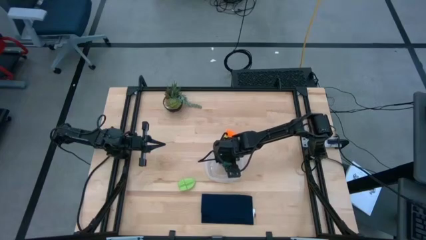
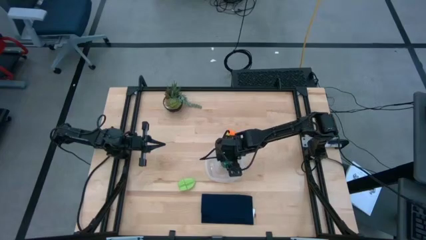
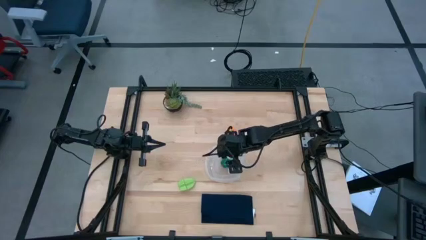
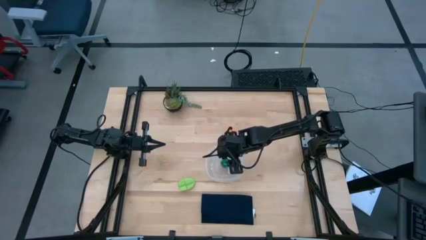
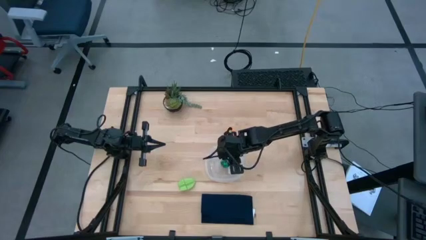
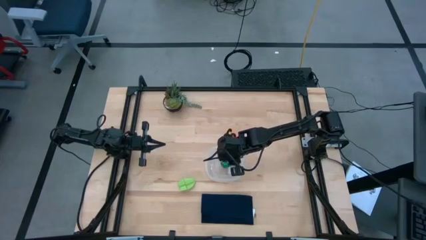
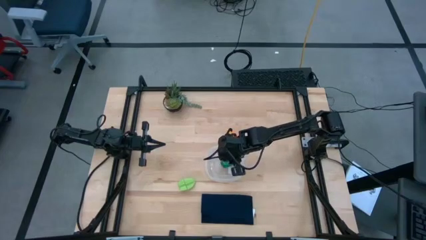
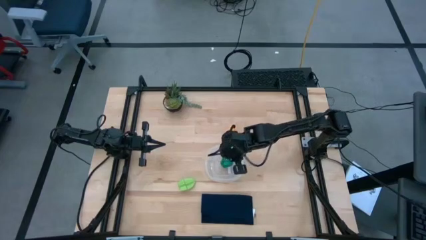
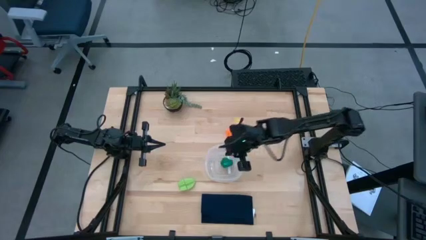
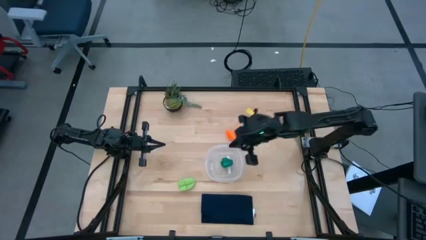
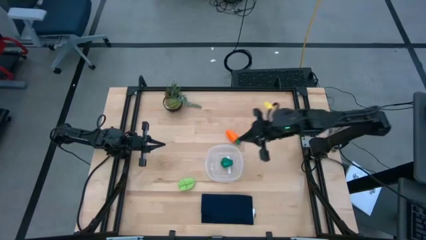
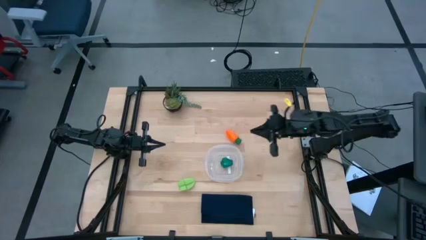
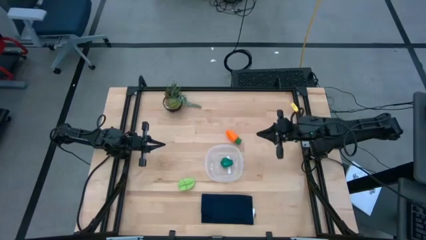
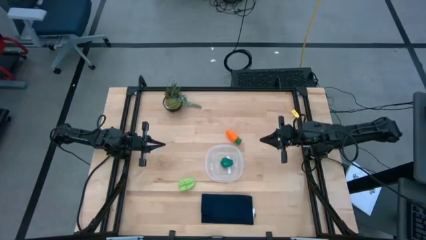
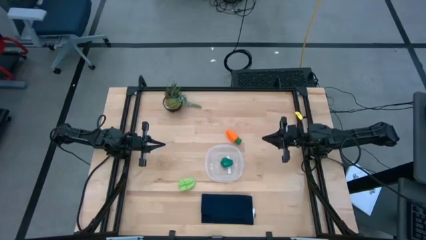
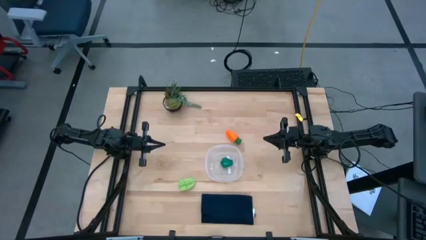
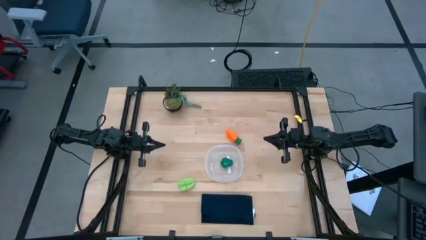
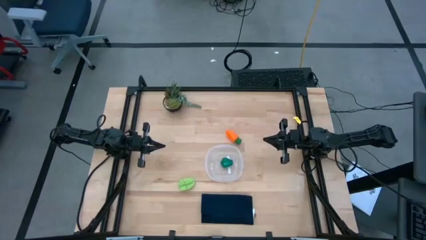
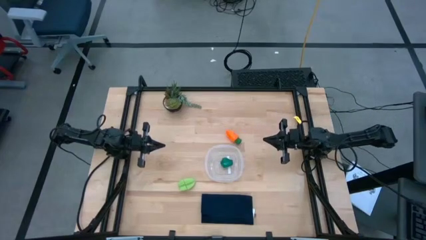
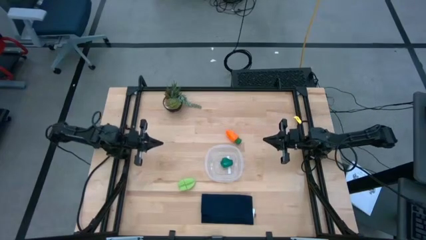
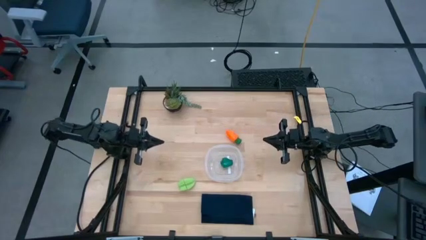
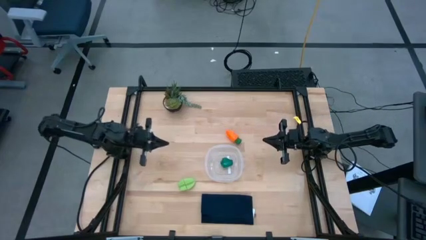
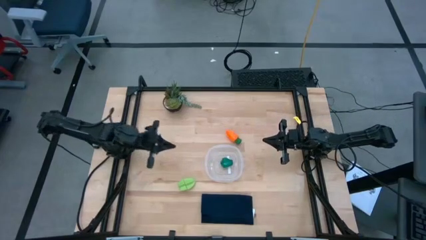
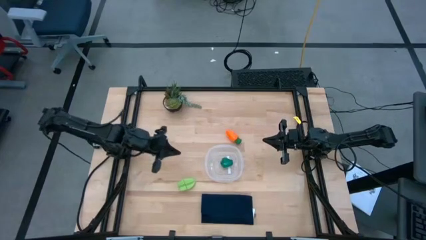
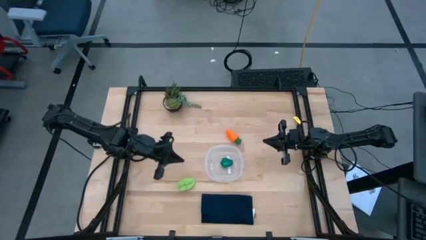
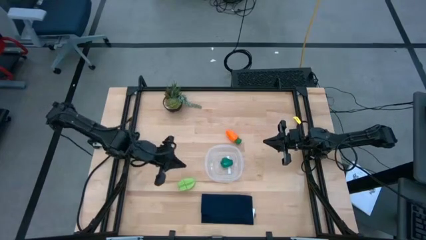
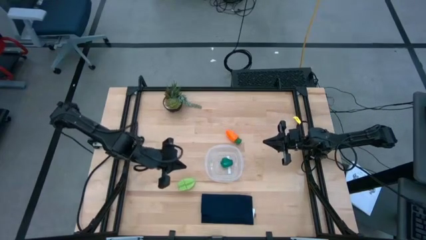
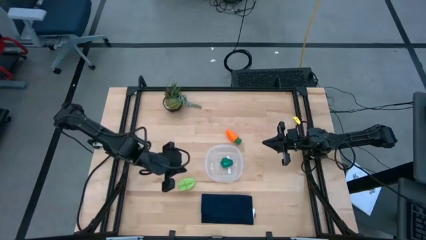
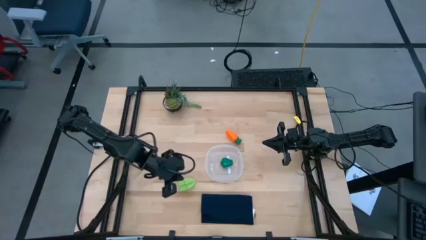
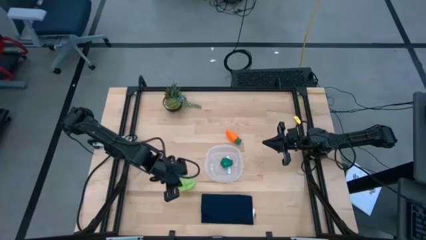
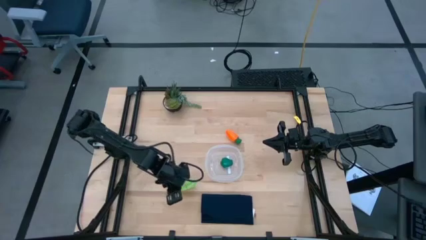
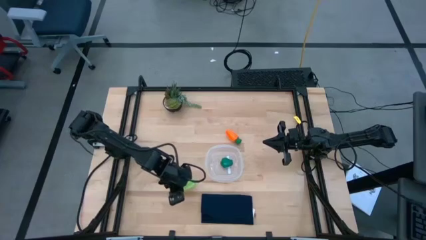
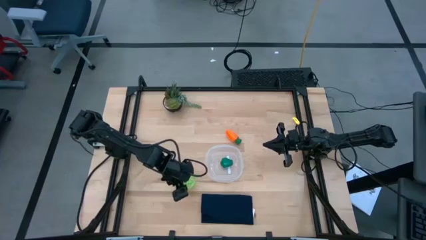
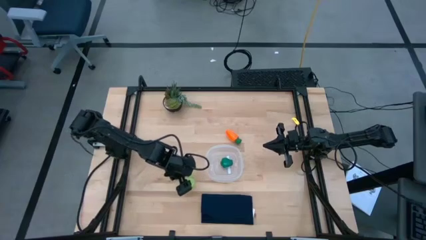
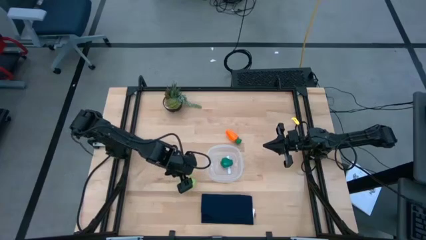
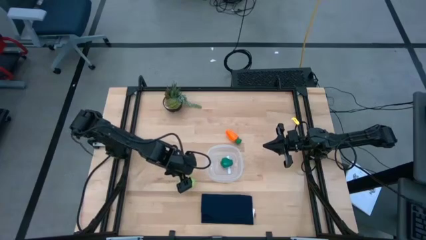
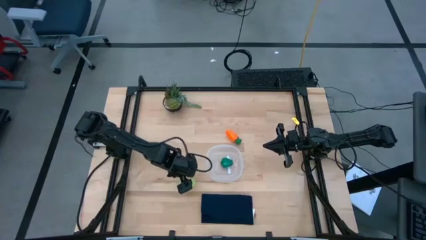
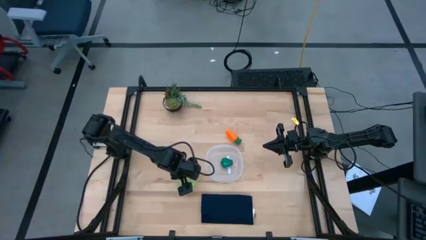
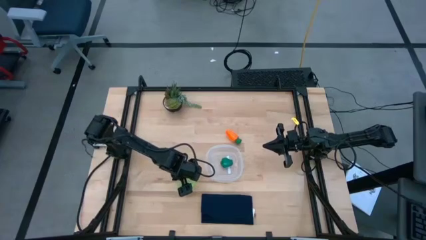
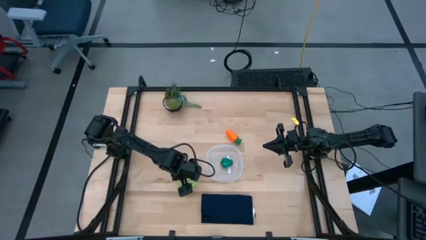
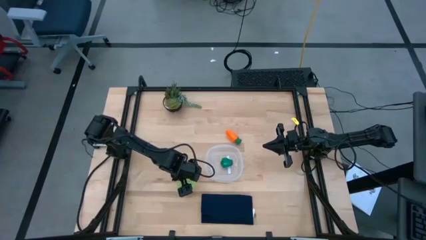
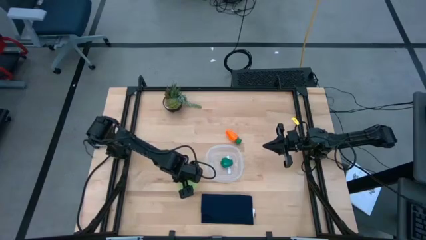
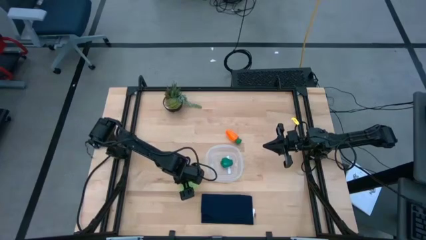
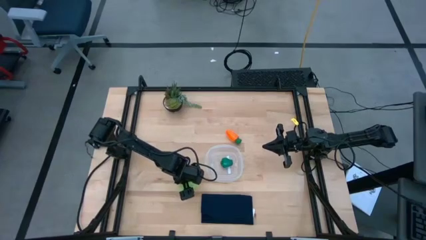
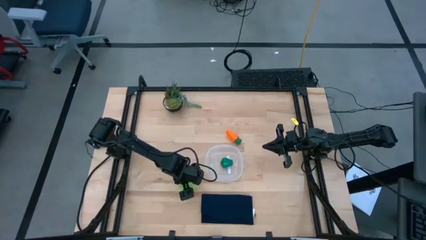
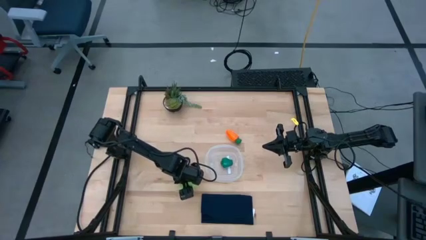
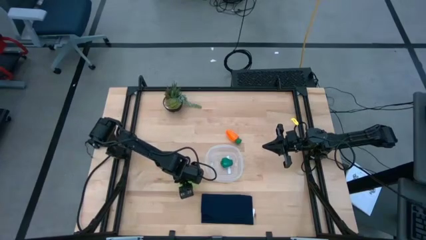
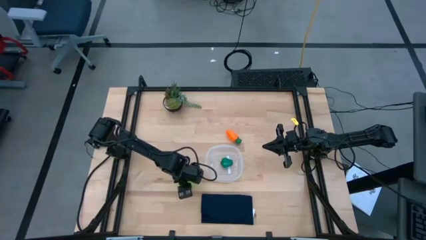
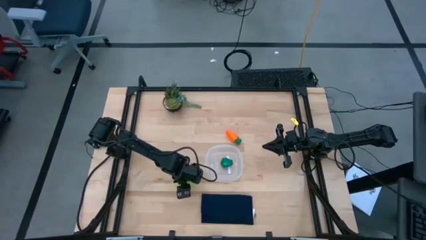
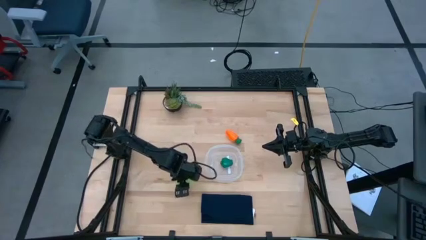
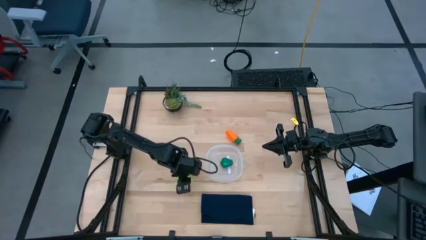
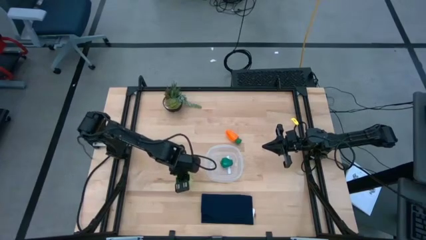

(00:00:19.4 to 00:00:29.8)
Task: Pick and placing Produce into tupperware
Put the green starfruit into the transparent bin
